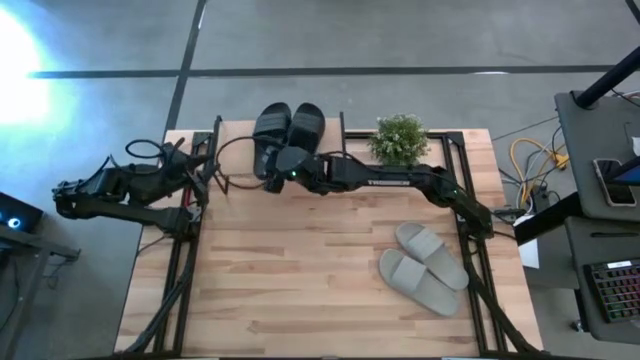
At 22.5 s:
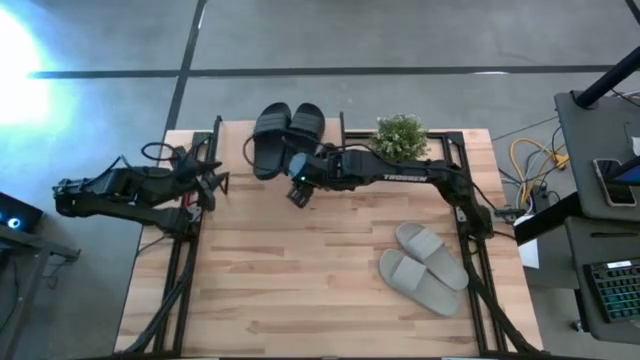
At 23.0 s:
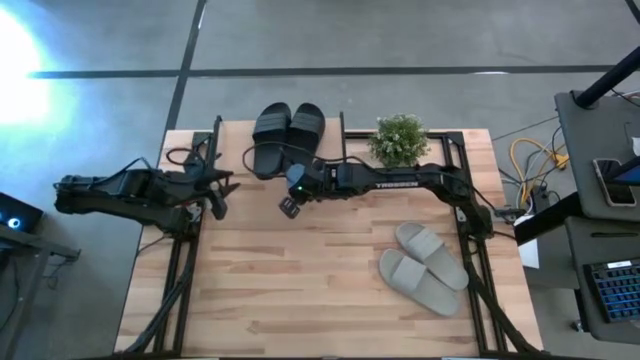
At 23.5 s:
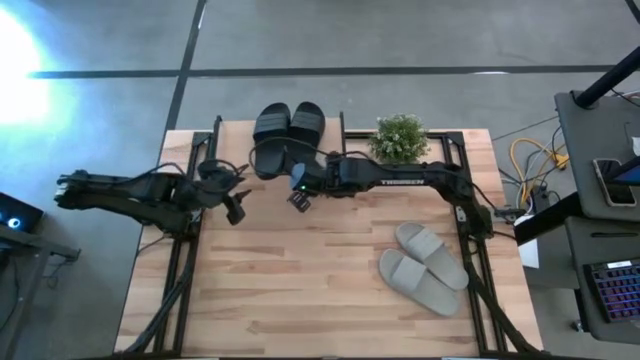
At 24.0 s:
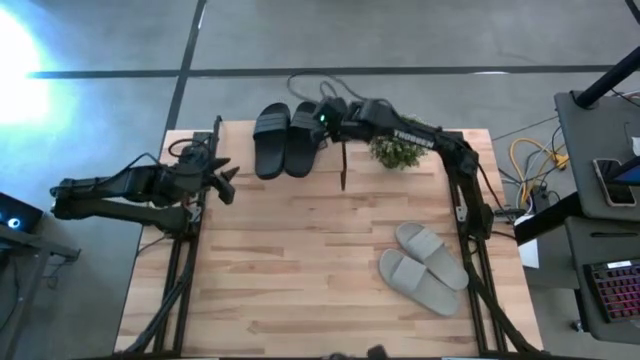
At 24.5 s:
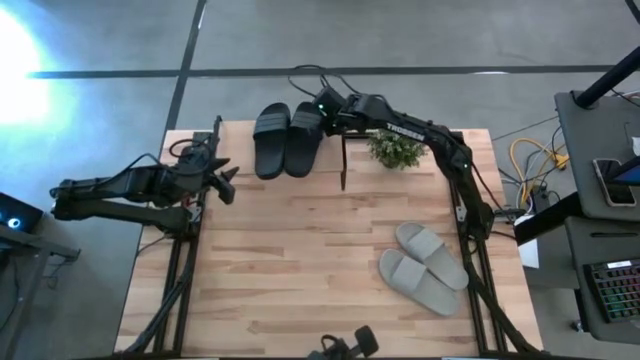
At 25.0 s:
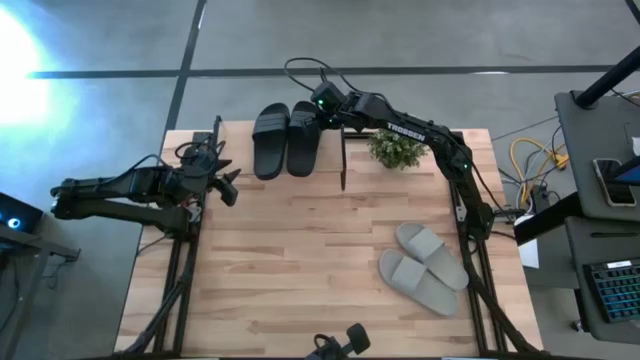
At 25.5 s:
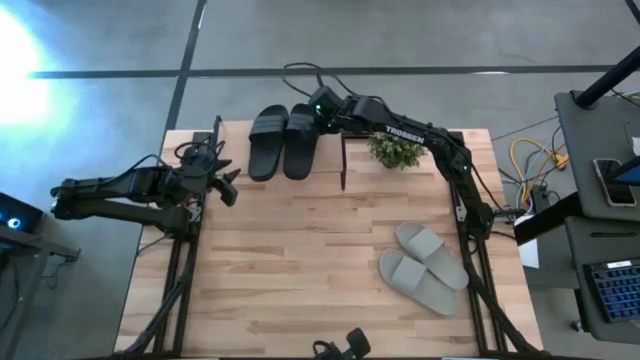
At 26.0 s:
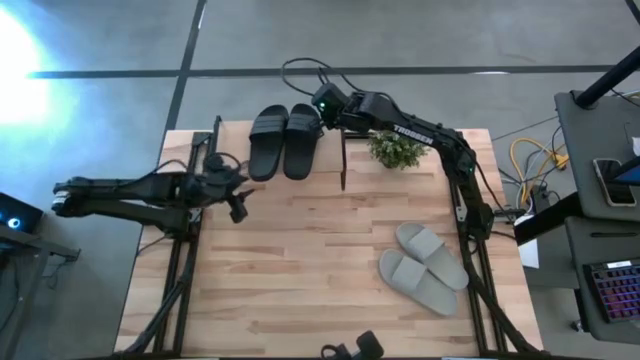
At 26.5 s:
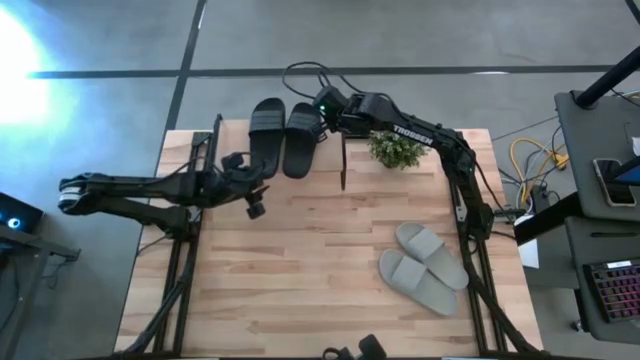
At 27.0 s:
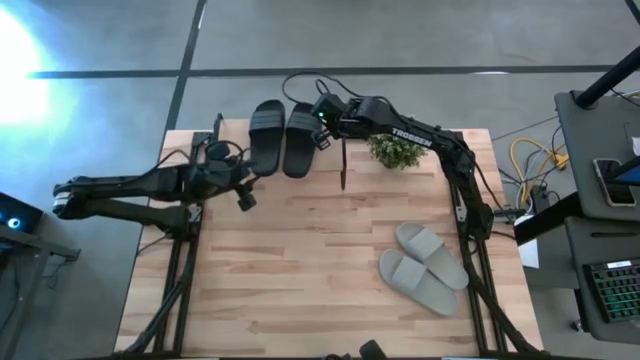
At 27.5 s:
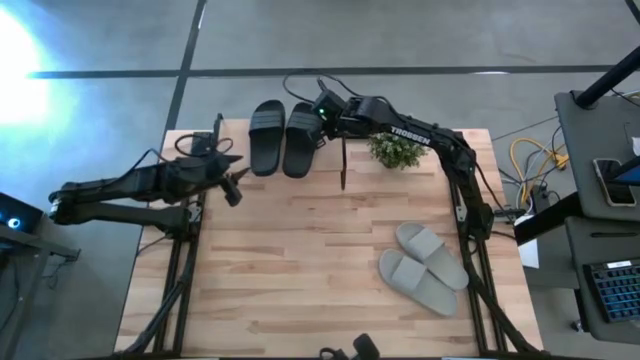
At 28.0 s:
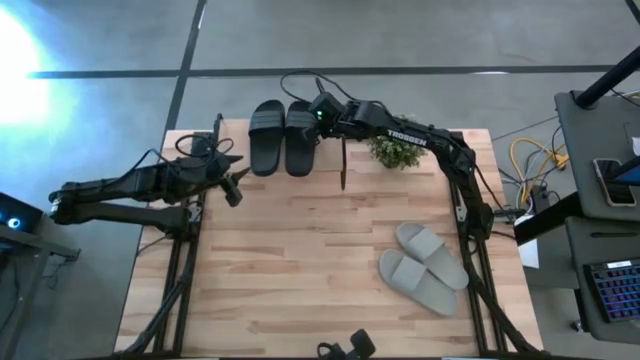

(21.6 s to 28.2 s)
Task: Pick and place slides into the shelf
Adjust the black slippers on the shelf

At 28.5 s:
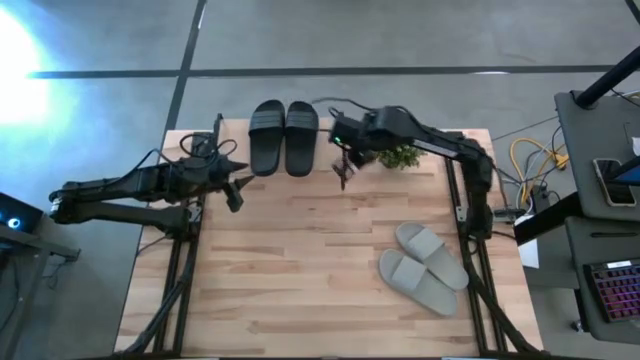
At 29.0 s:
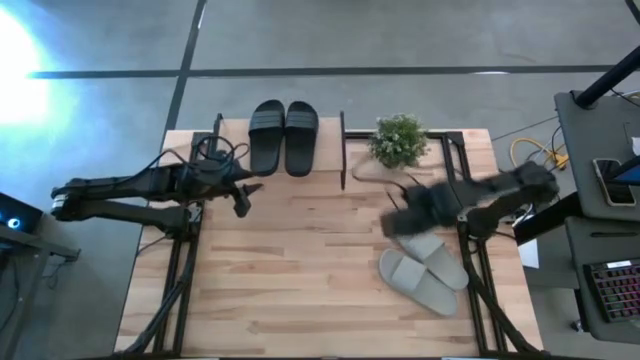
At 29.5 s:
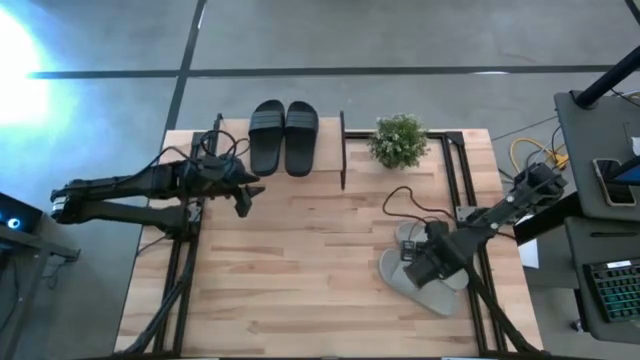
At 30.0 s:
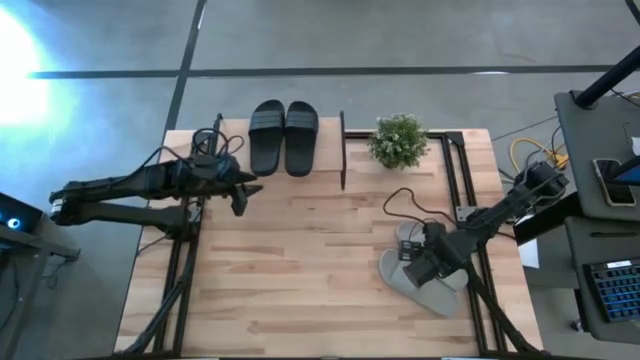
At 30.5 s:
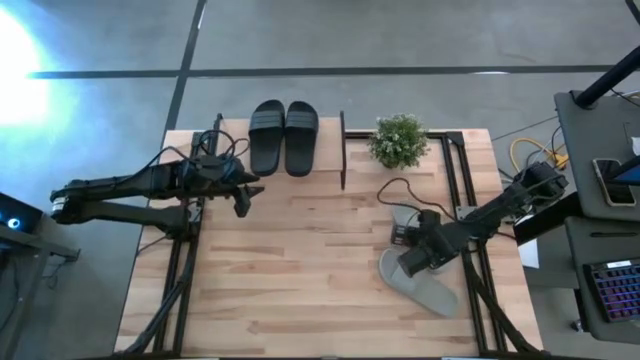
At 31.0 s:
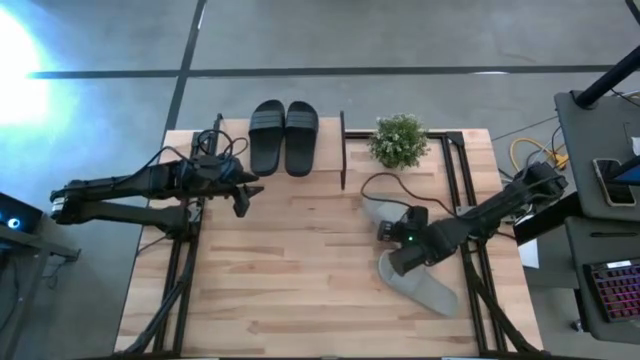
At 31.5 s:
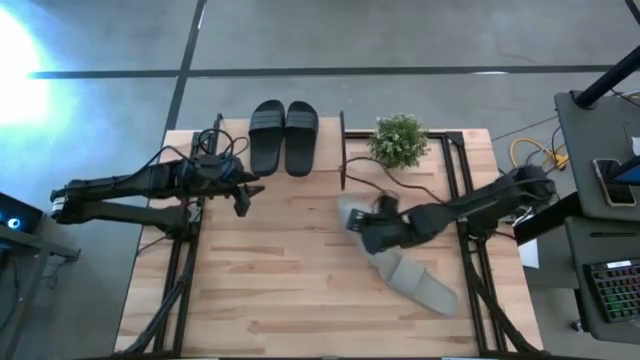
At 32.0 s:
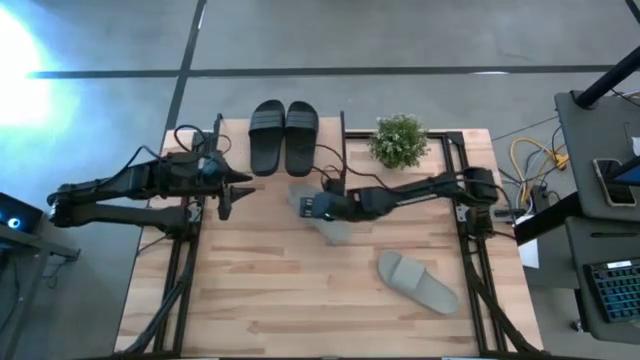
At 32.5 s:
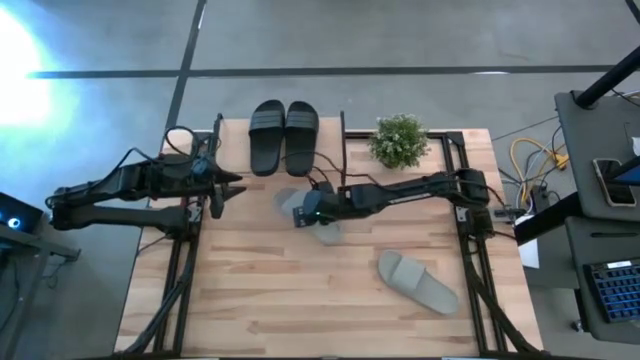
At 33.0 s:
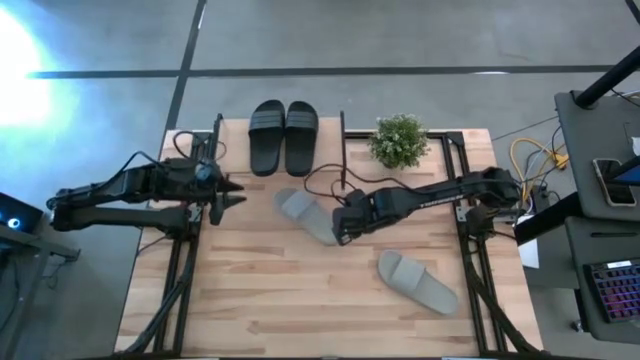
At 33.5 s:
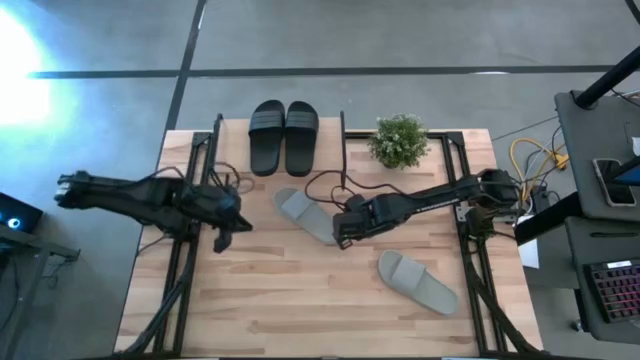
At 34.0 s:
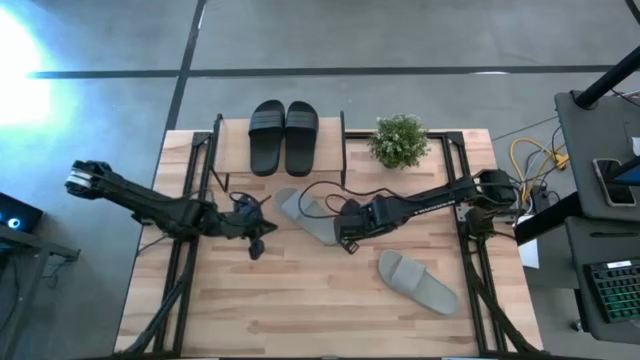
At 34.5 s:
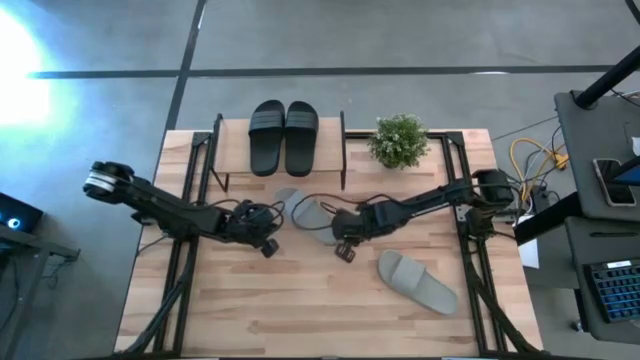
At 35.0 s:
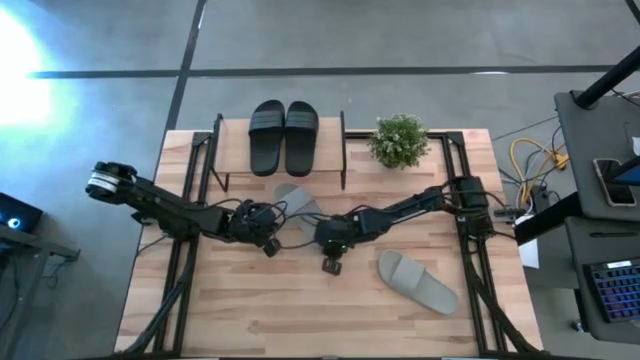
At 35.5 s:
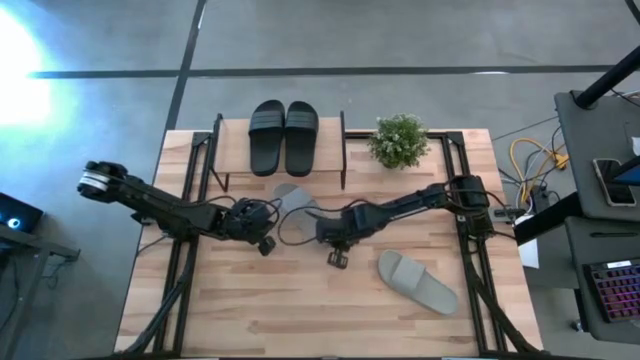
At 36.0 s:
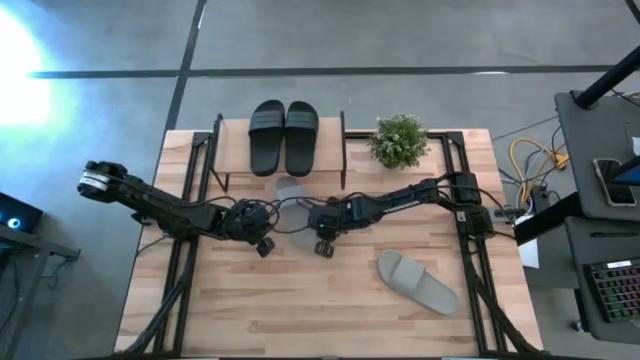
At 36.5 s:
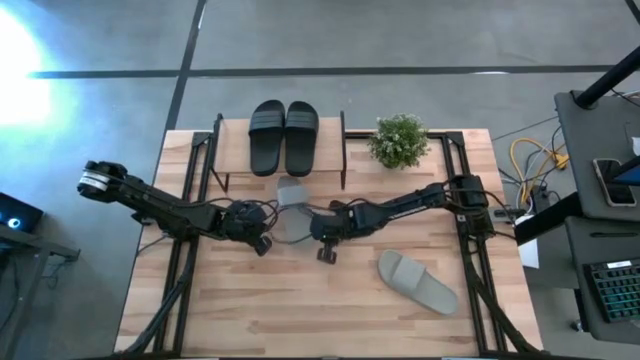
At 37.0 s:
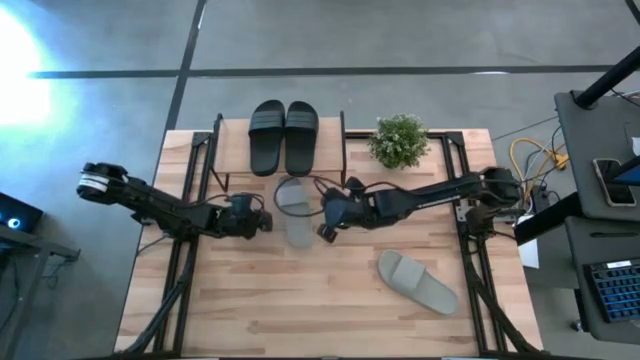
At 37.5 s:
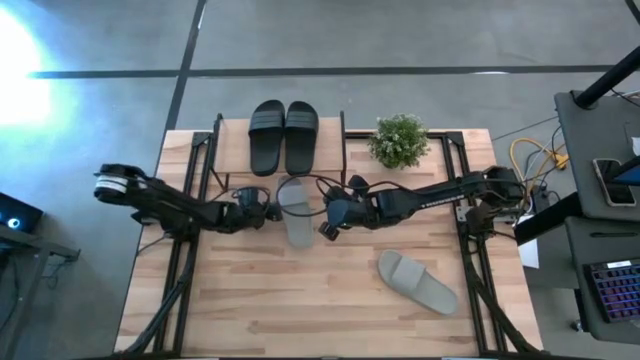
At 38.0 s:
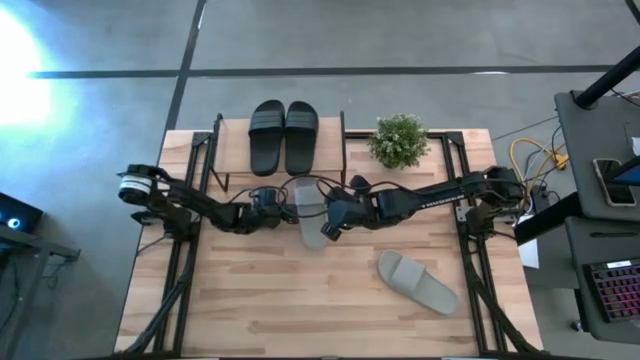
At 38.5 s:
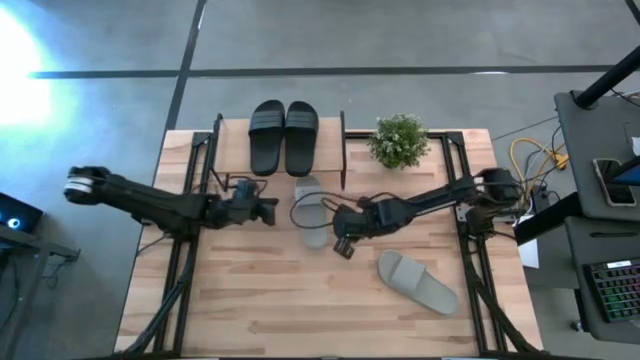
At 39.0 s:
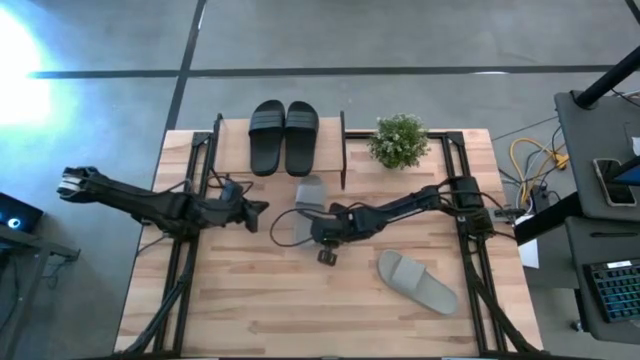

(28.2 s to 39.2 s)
Put the right grey slipper under the shelf

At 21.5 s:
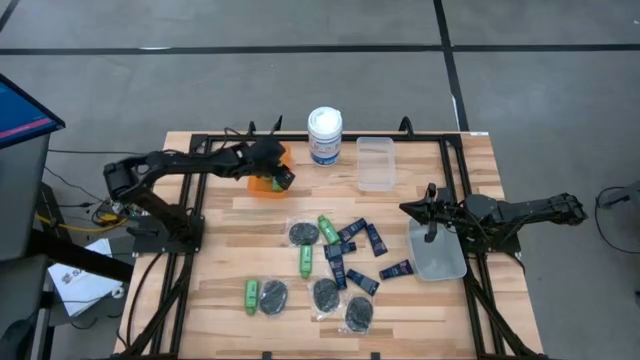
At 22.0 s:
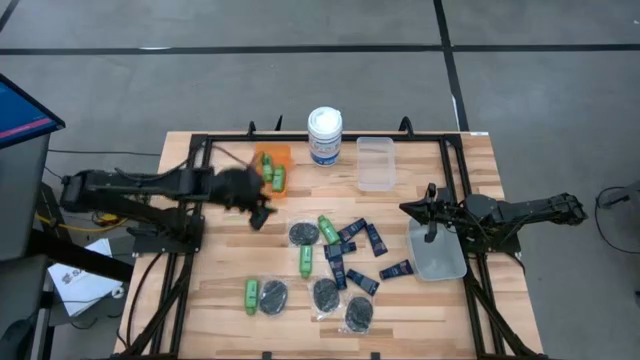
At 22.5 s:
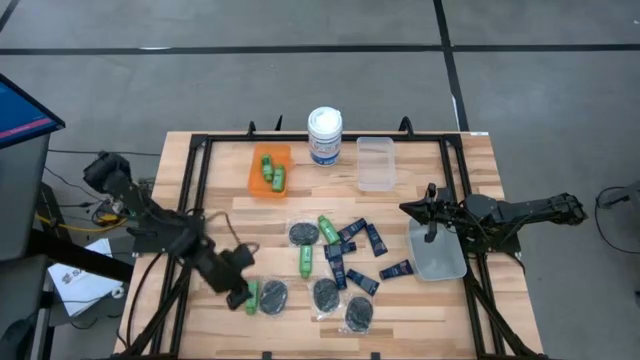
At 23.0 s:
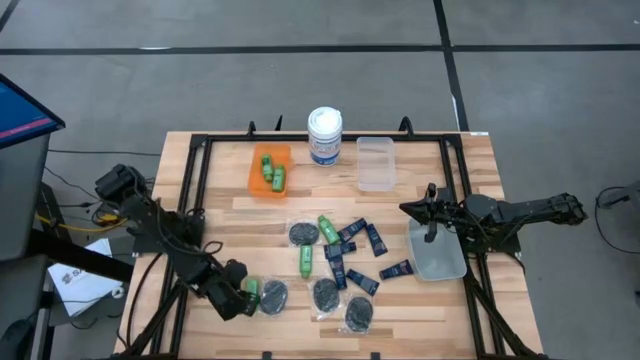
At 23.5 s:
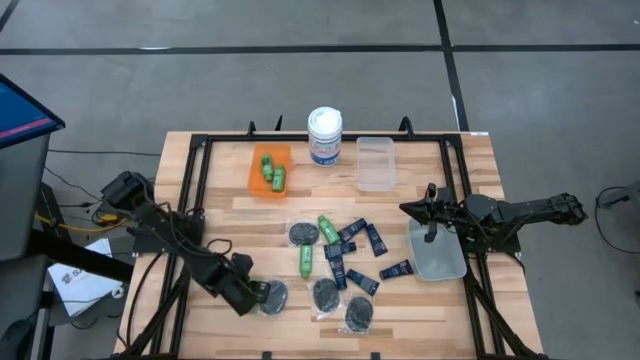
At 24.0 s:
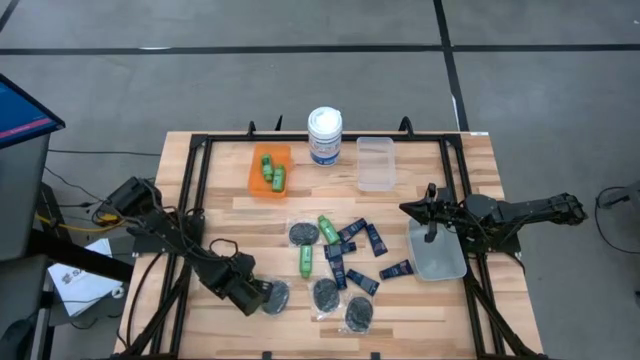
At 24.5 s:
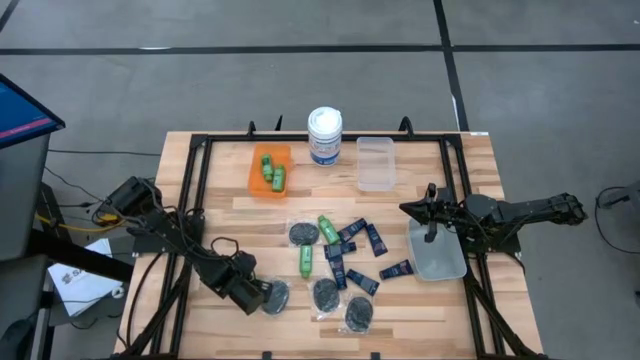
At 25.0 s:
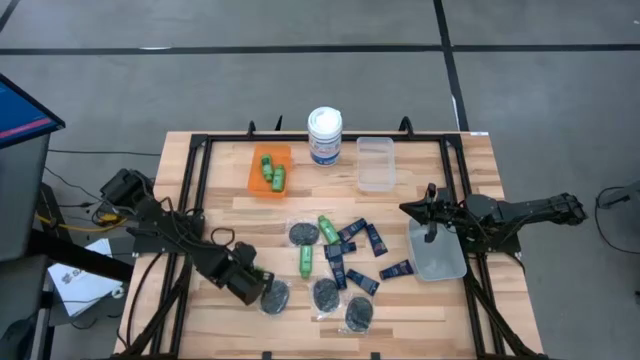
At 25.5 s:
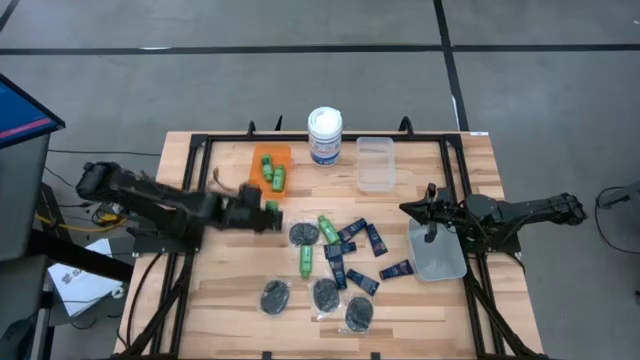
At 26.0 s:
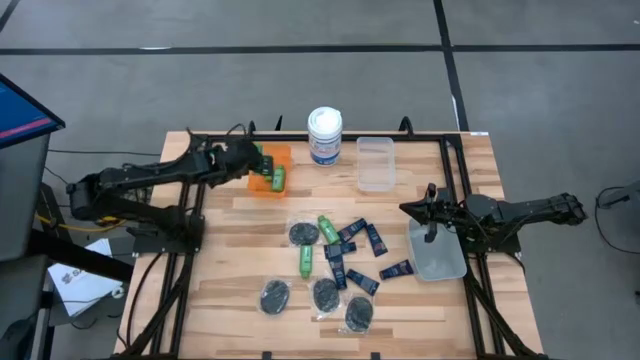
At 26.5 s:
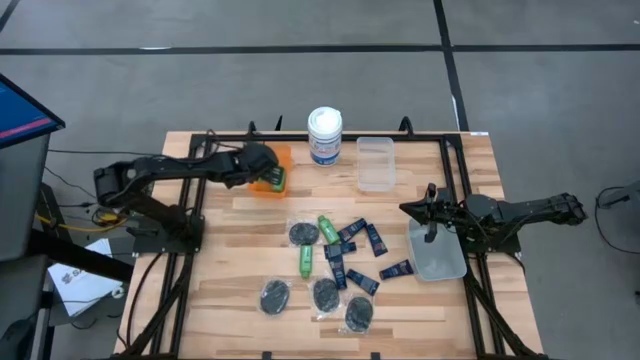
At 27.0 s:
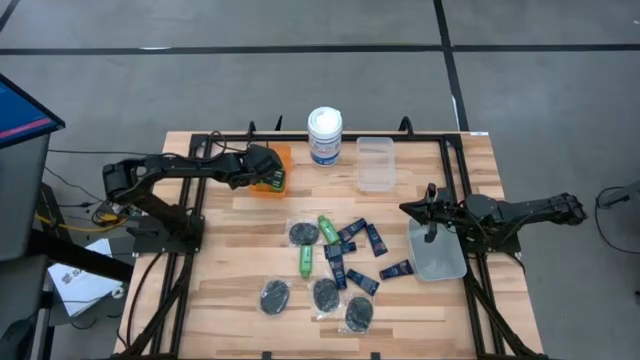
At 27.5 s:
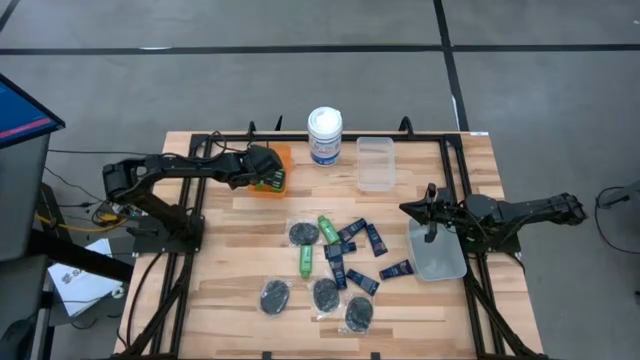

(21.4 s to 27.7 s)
Task: Pick & Place Travel size toiletries
Put the green shampoo into the orange bin
